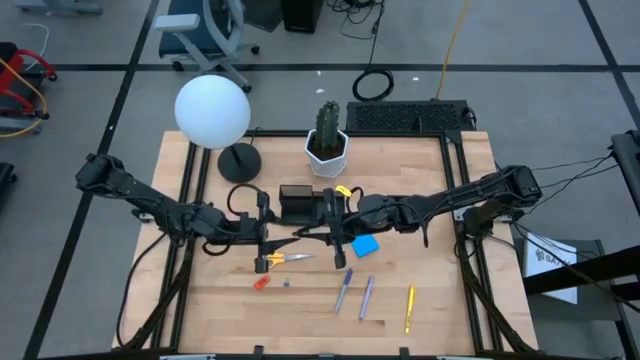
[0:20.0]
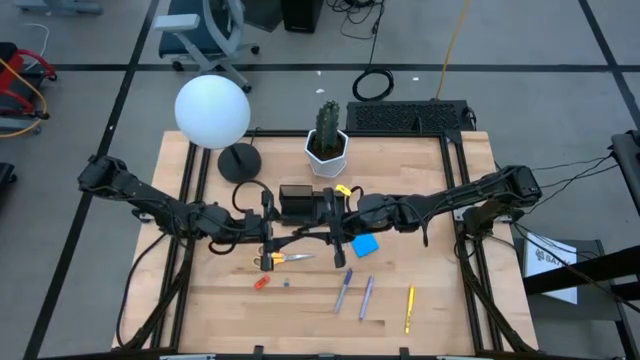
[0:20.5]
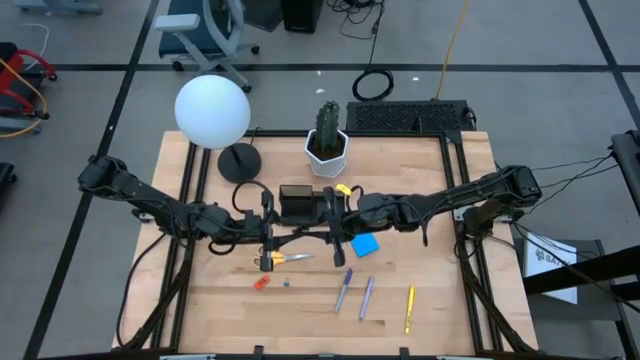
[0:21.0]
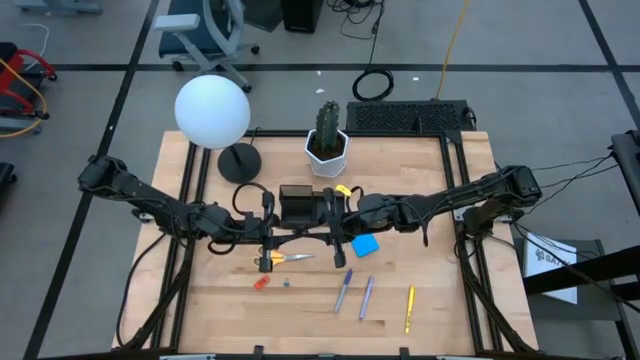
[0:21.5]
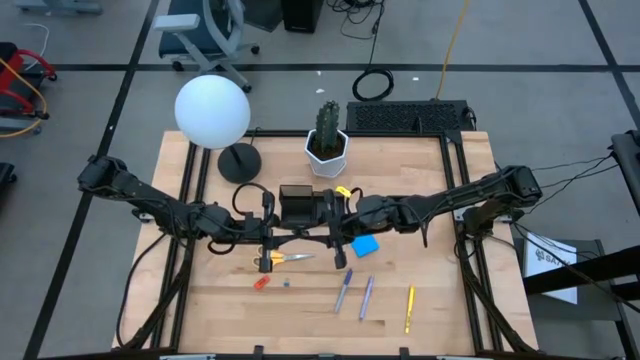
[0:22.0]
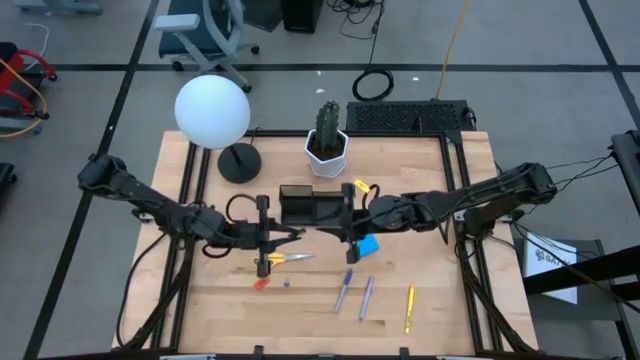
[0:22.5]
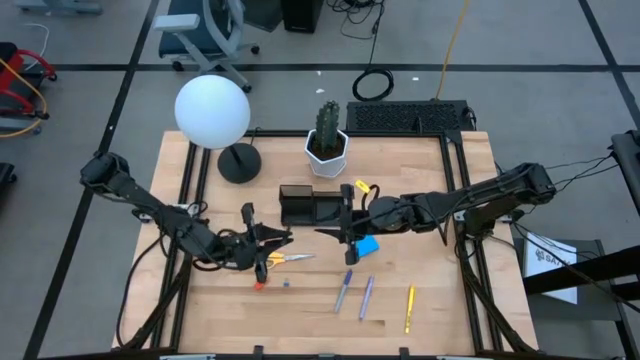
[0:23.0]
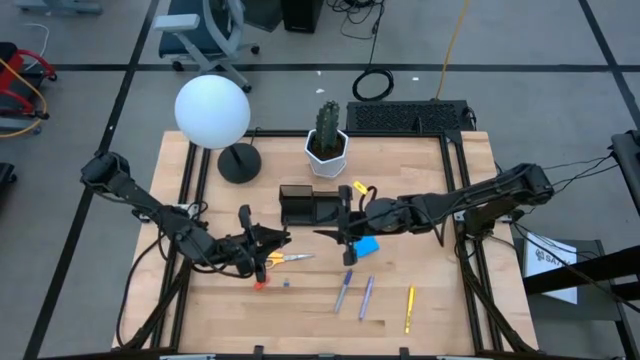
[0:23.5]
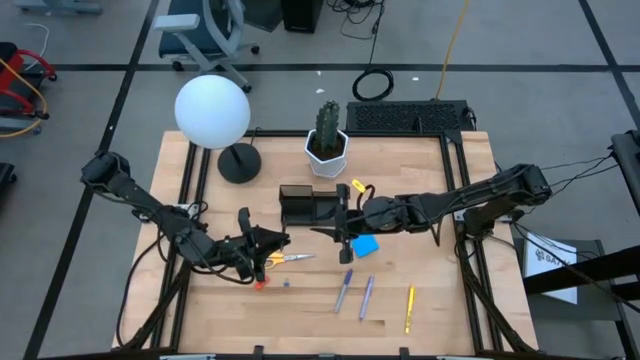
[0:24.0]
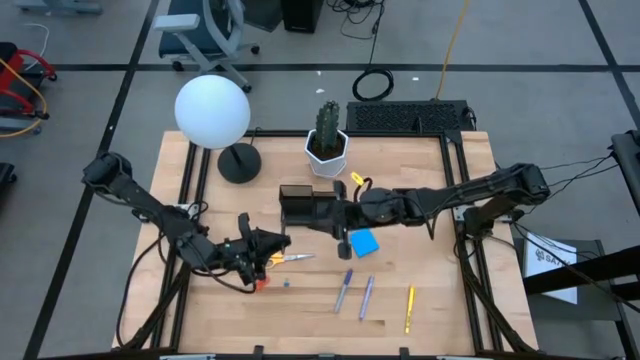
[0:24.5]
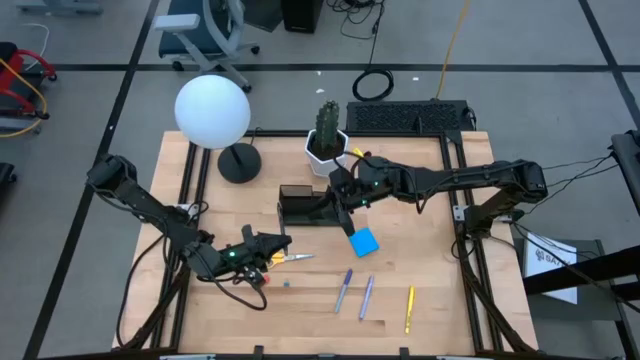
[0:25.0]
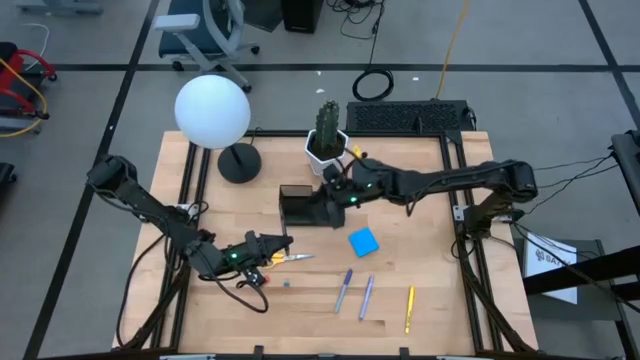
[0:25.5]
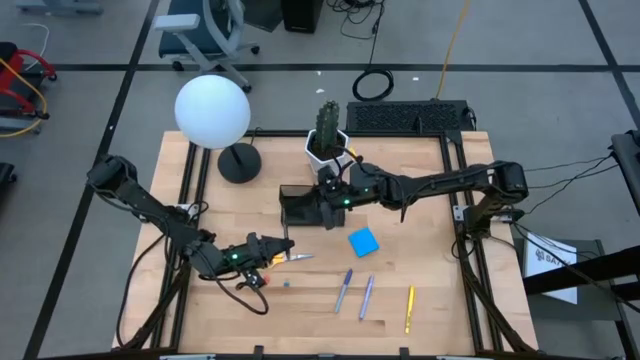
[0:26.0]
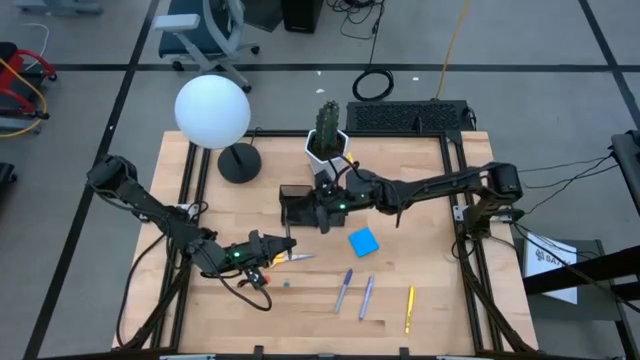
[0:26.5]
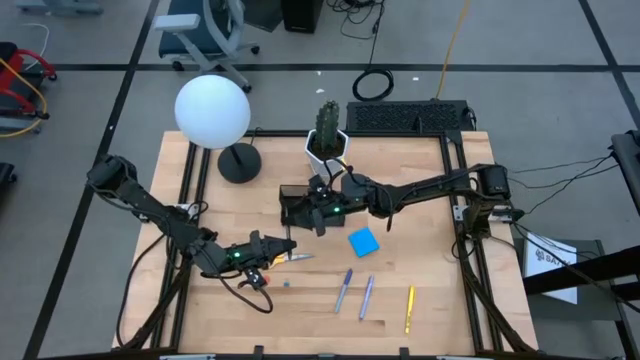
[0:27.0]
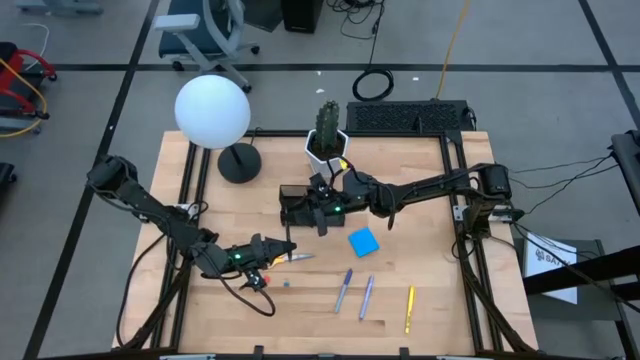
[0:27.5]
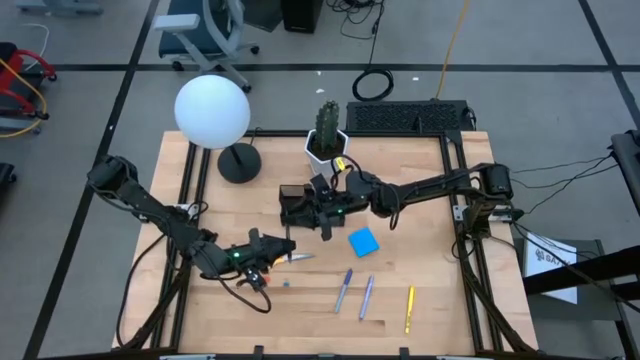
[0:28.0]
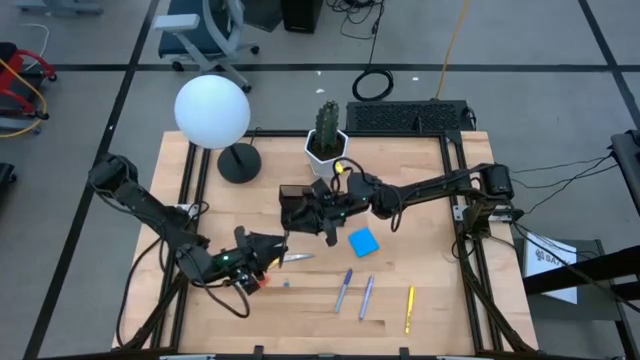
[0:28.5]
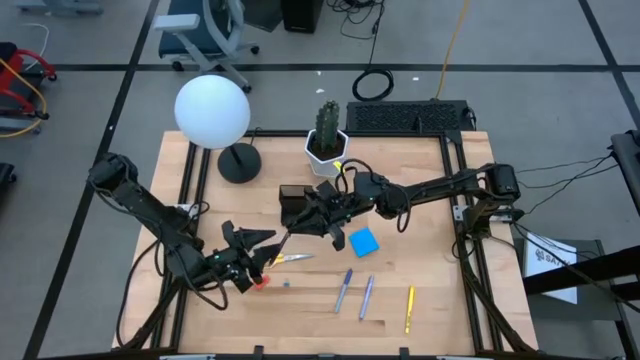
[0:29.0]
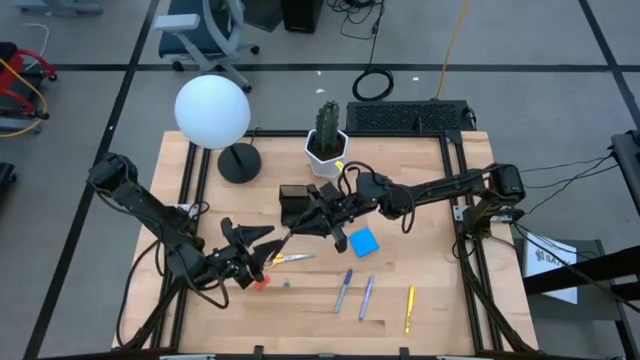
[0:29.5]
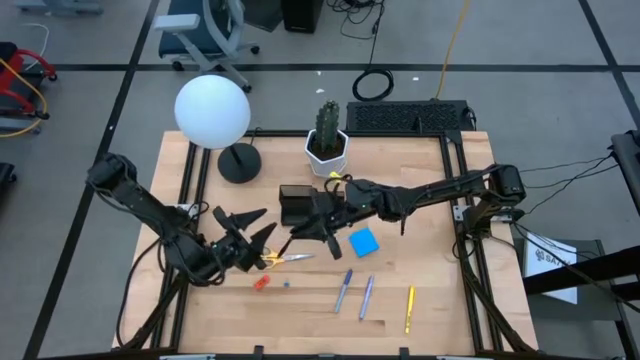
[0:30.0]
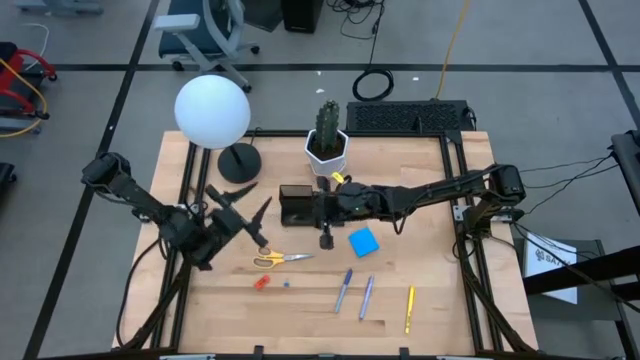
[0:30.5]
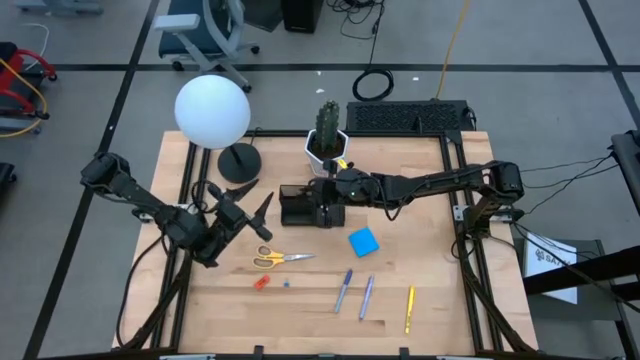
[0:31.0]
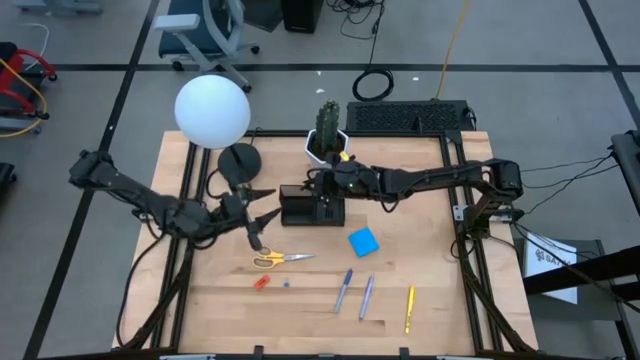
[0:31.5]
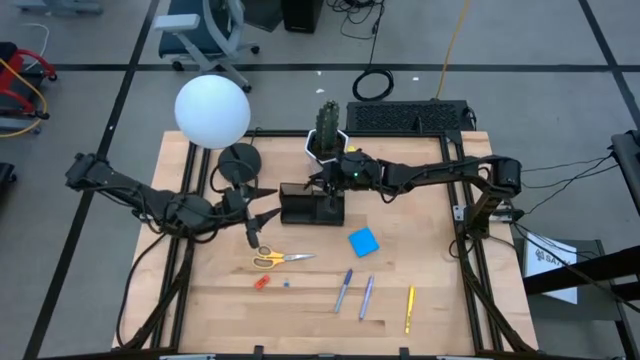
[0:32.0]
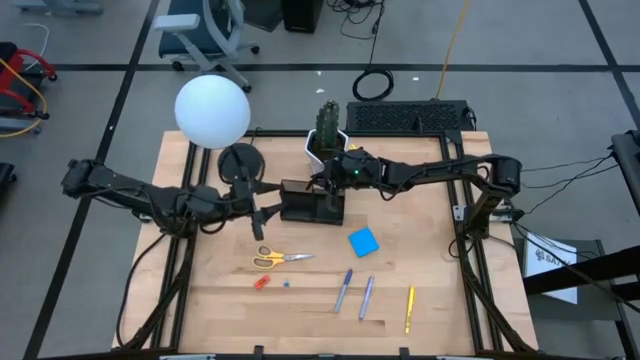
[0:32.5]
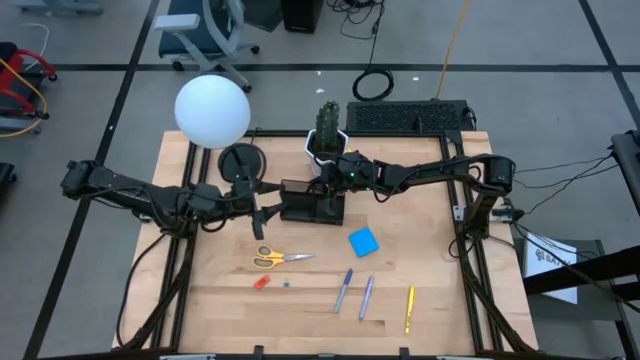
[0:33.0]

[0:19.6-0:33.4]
Task: Pick and place office supplies into organizer
Put the black pen into the desk organizer

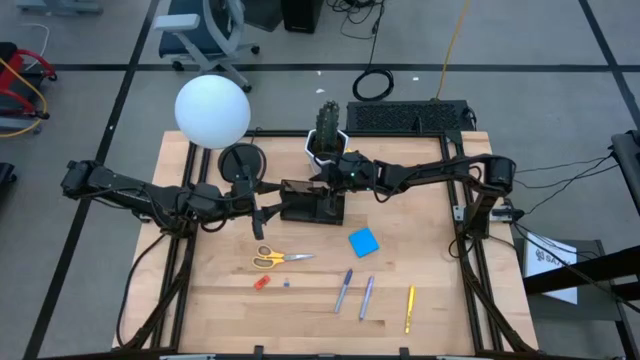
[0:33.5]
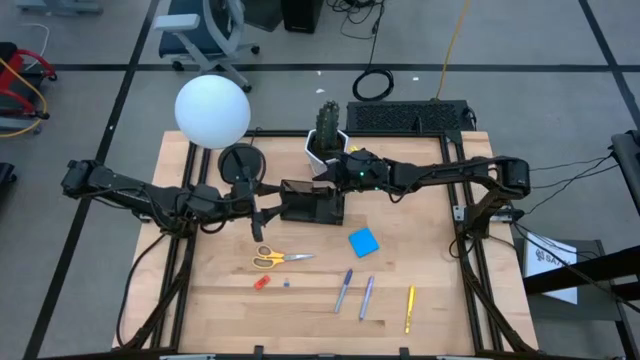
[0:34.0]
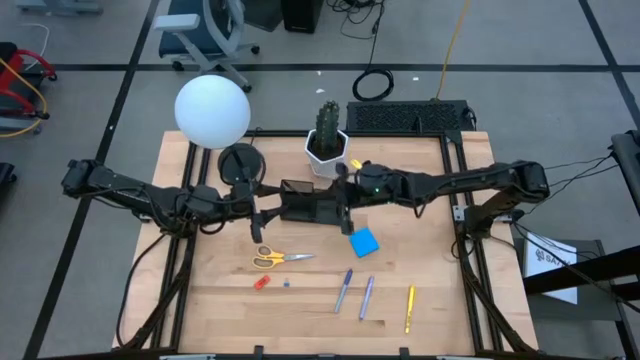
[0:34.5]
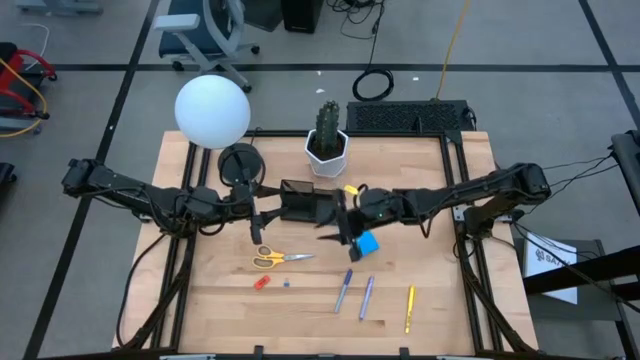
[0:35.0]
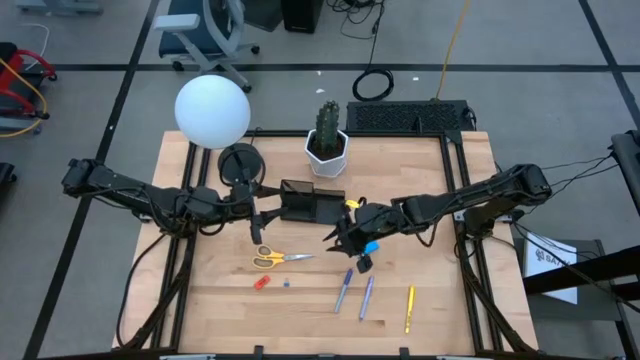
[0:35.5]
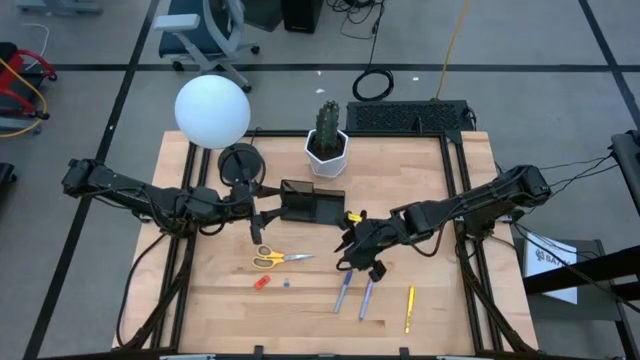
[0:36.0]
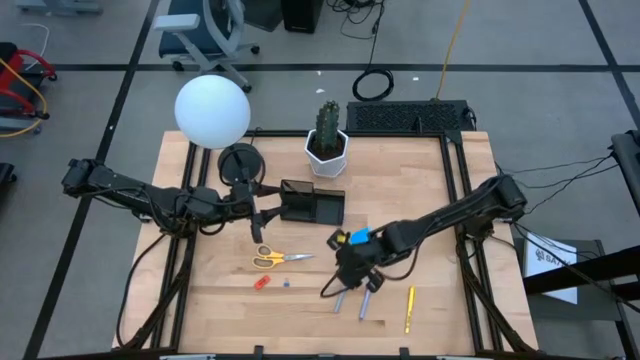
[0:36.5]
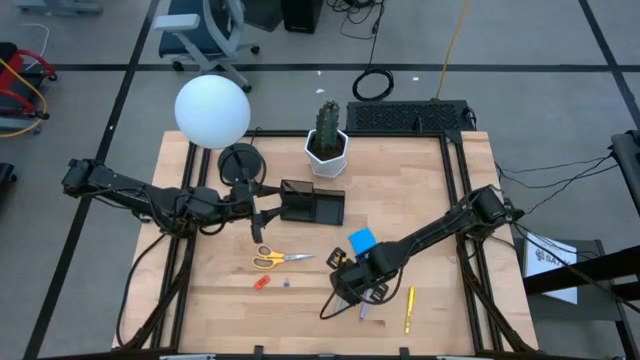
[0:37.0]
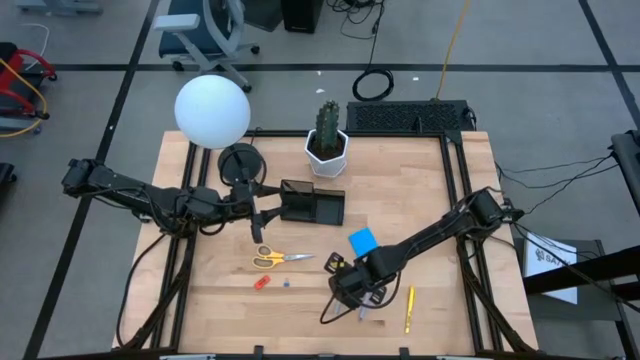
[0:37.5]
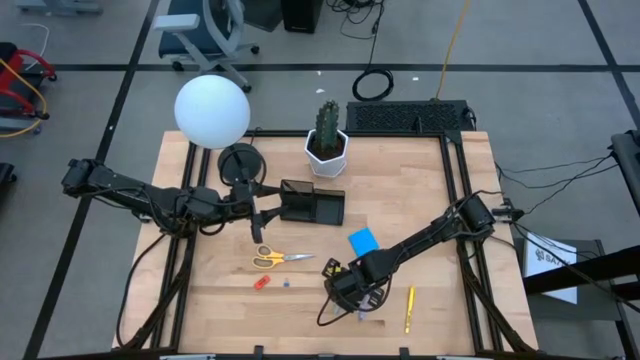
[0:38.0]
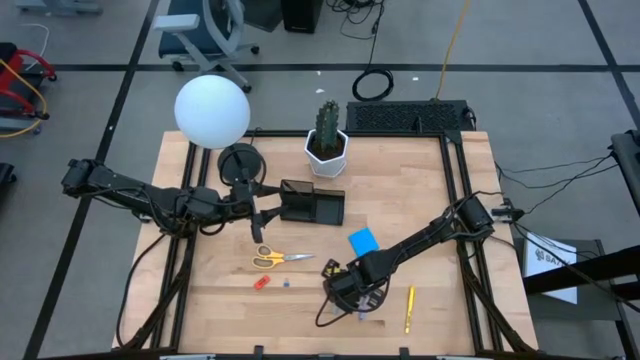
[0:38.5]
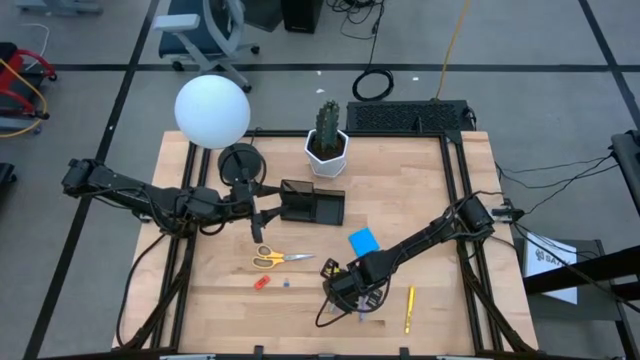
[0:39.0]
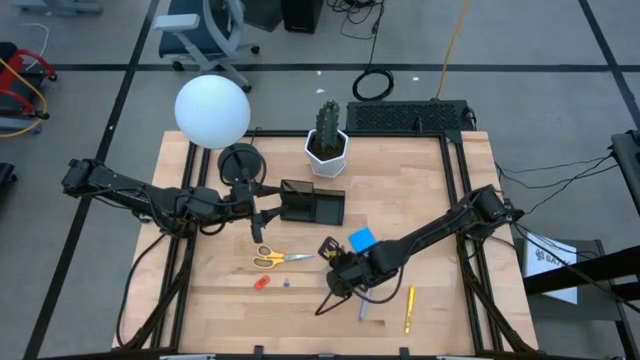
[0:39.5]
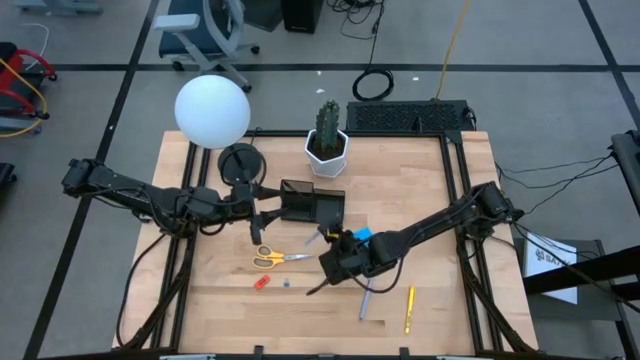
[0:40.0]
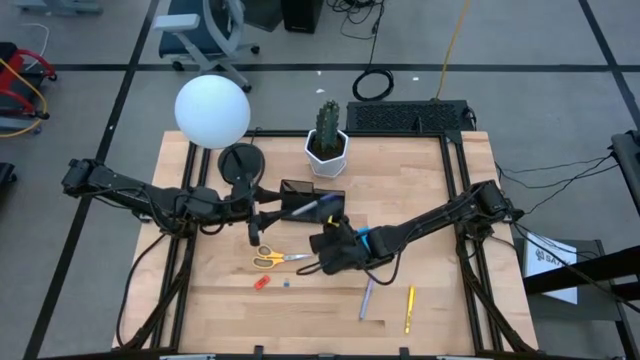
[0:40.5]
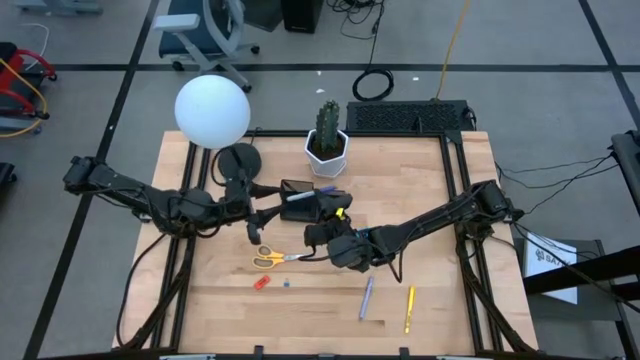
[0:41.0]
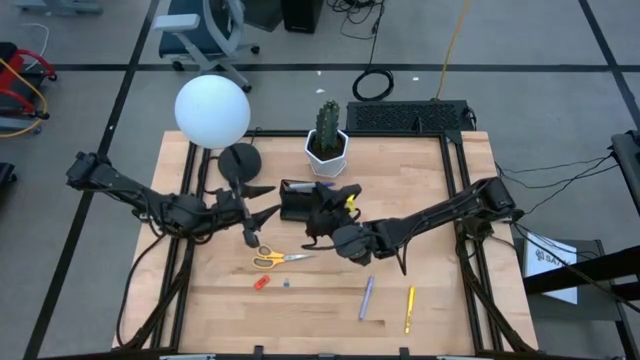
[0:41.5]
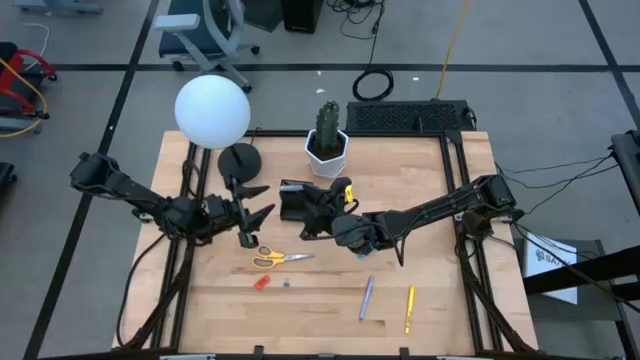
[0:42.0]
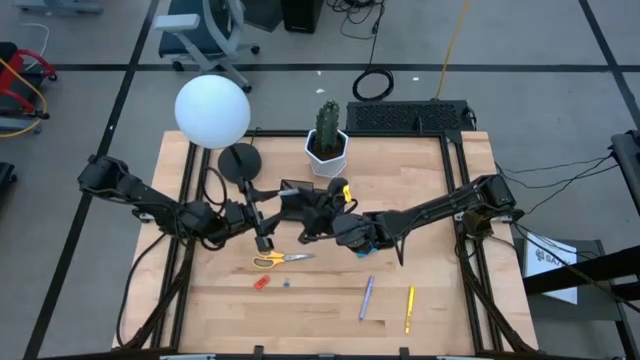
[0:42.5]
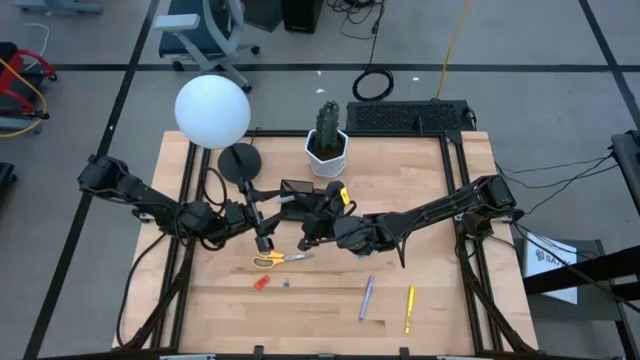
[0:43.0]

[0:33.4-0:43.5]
Put the blue pen into the desk organizer
